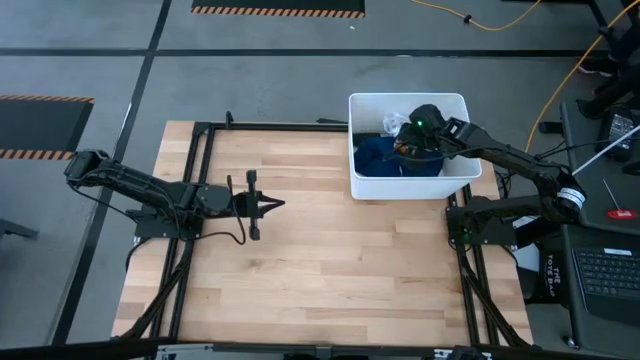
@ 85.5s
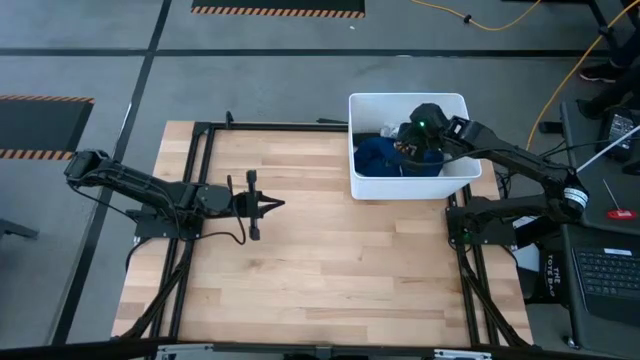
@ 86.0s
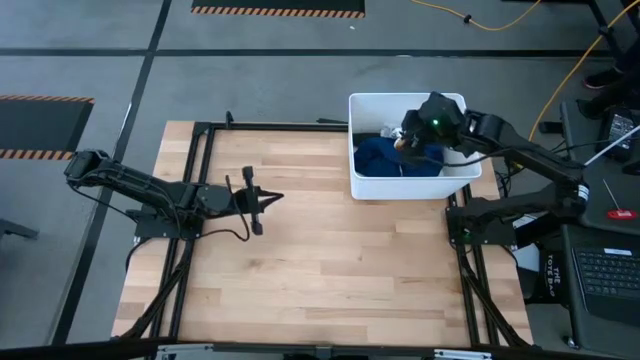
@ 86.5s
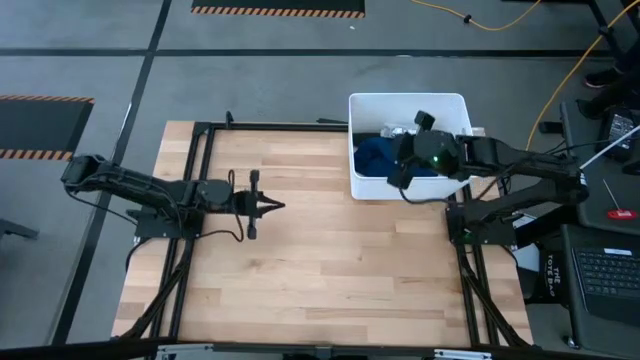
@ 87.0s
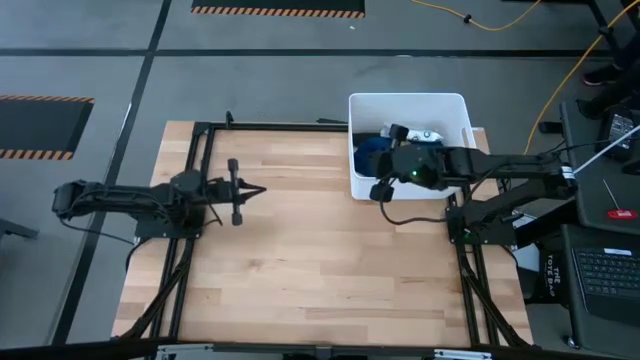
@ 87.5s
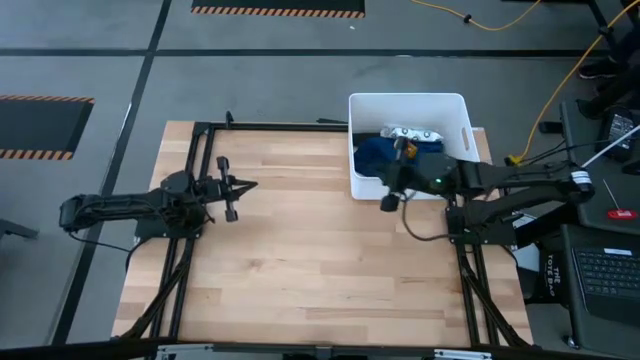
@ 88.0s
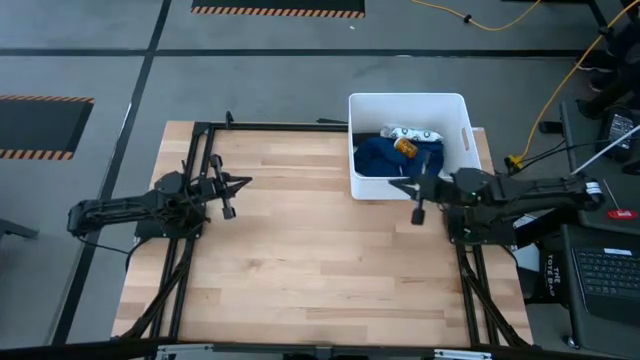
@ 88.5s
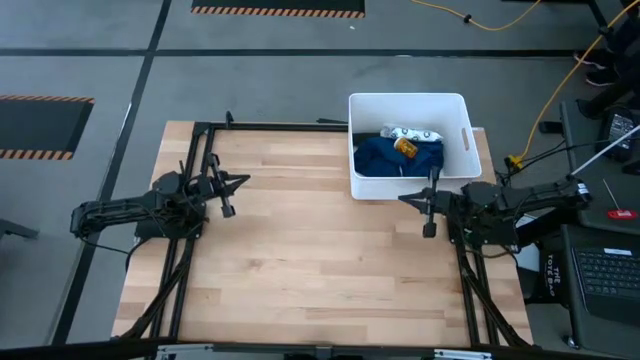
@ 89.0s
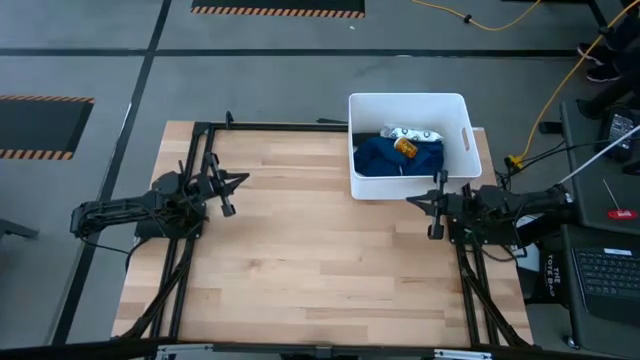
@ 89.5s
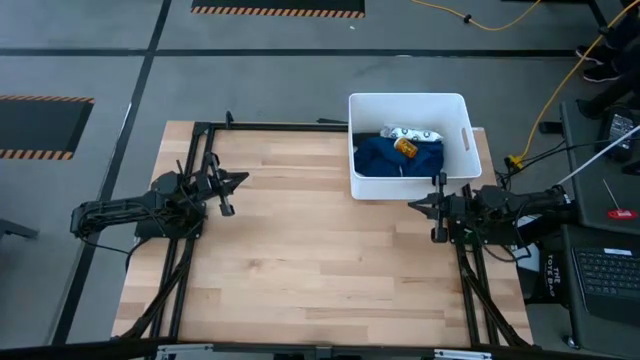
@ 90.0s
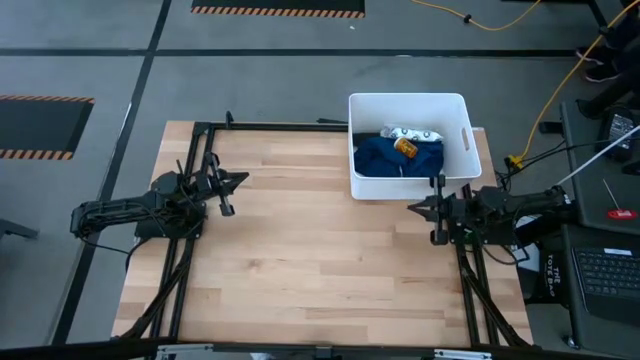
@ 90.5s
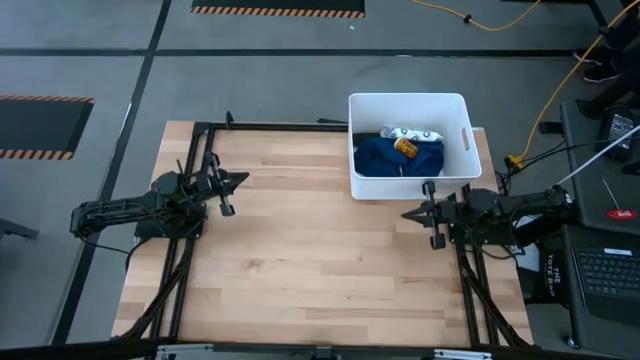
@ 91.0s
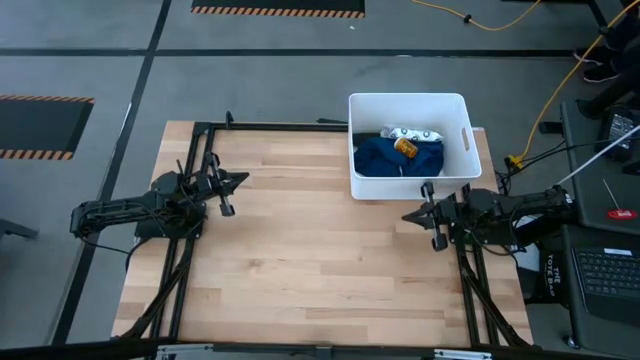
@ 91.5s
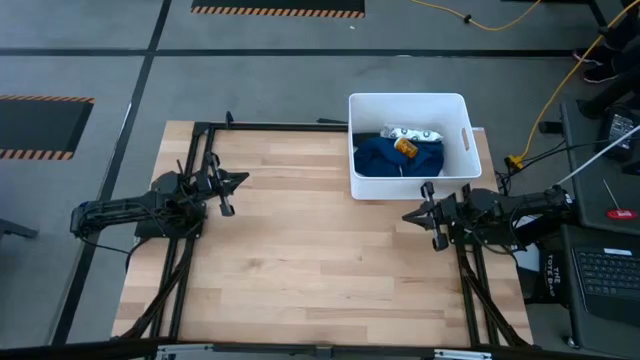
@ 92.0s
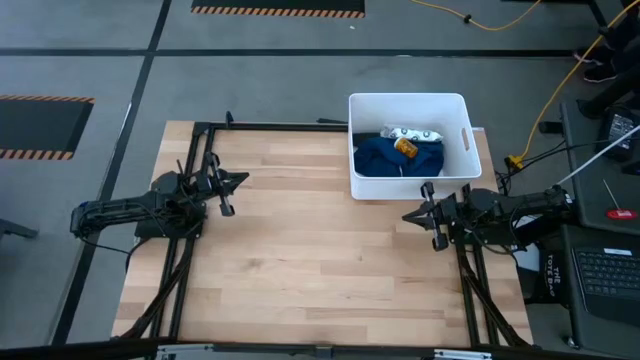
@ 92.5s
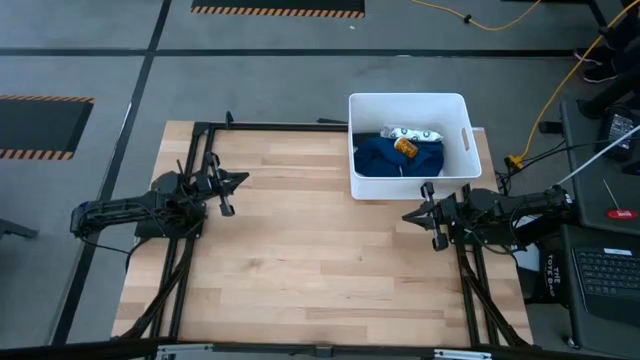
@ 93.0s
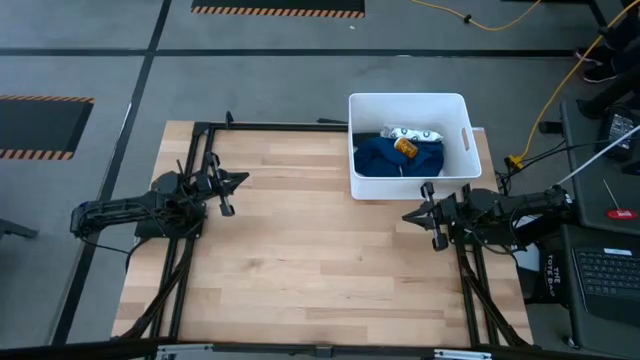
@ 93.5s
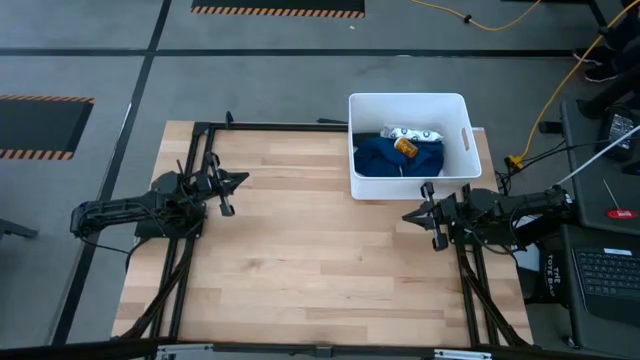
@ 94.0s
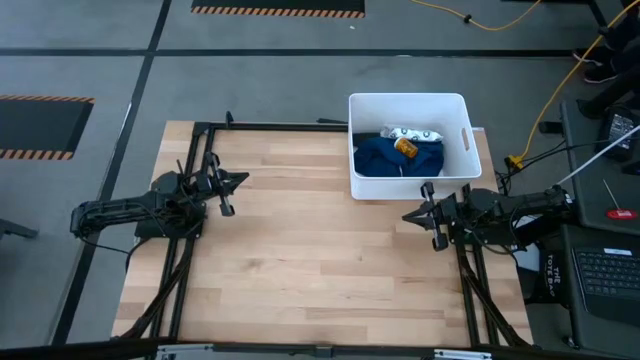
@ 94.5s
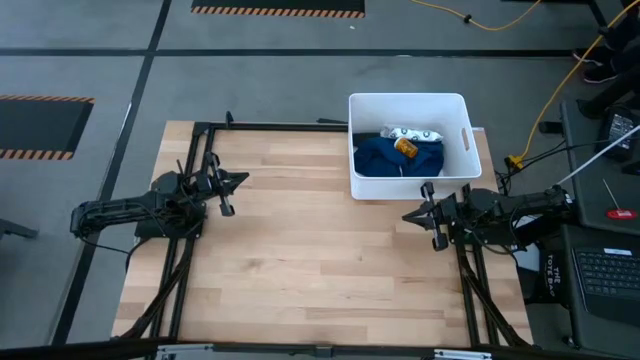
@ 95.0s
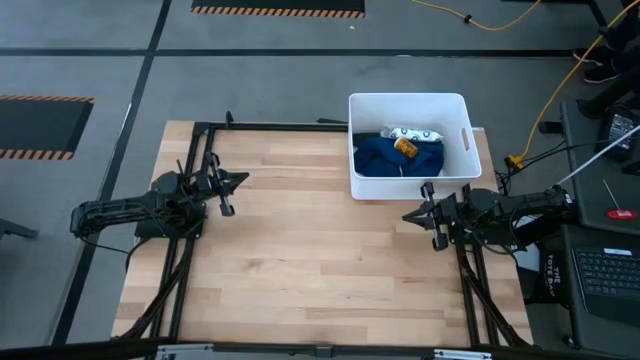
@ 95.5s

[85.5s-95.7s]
Task: Pick & place medical supplies in basket/bin
Return to Home Position
